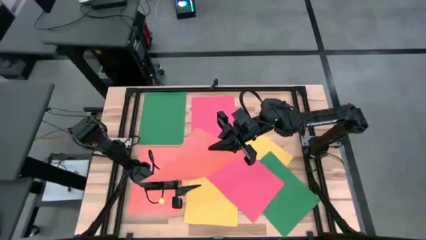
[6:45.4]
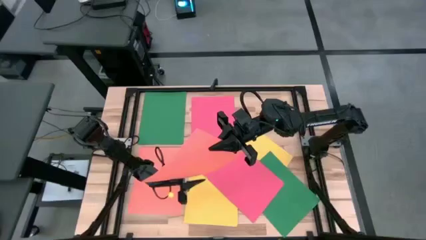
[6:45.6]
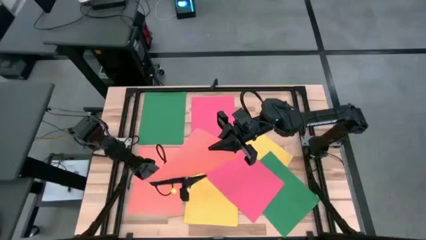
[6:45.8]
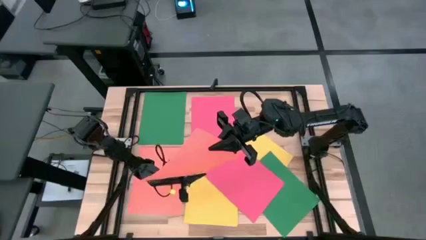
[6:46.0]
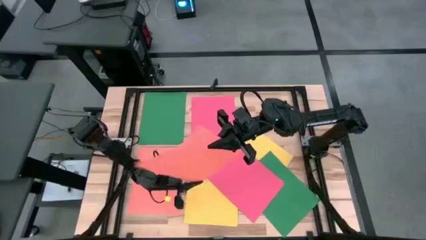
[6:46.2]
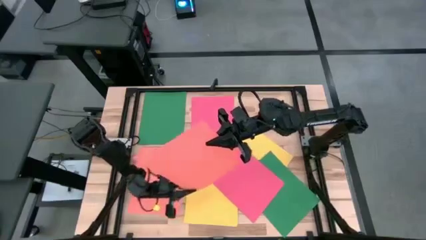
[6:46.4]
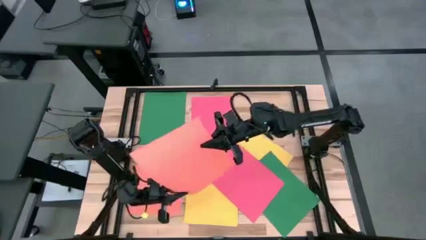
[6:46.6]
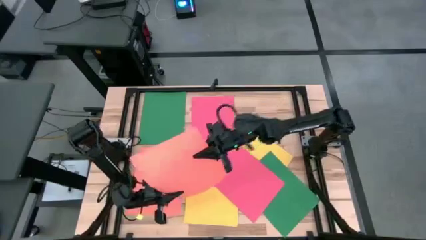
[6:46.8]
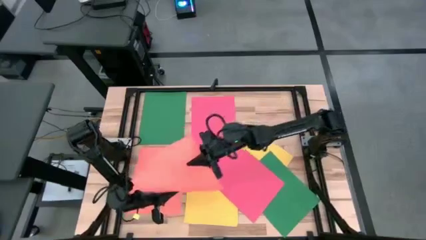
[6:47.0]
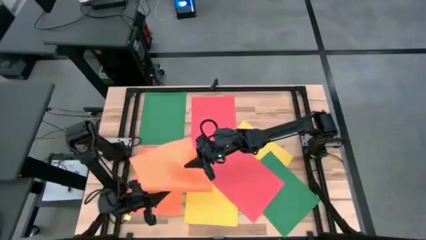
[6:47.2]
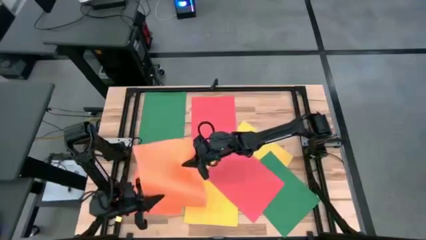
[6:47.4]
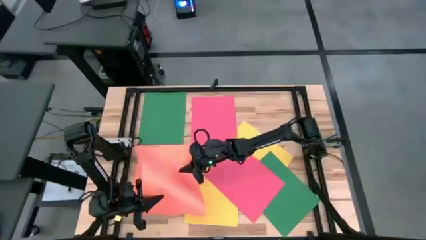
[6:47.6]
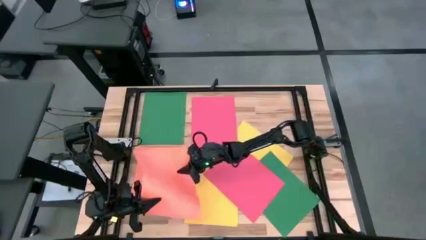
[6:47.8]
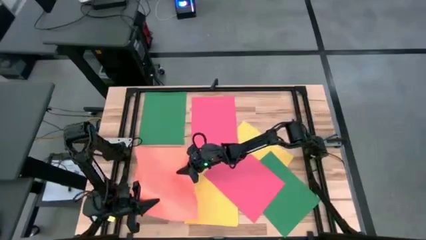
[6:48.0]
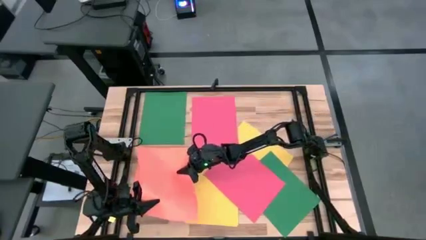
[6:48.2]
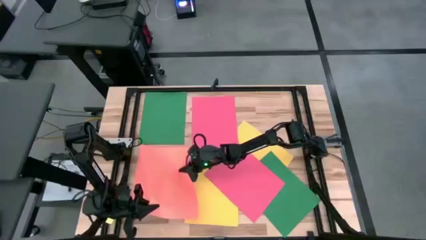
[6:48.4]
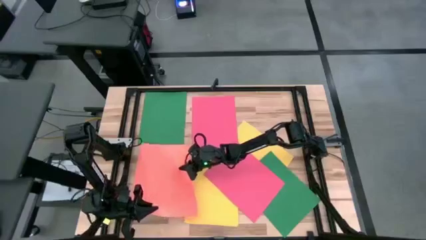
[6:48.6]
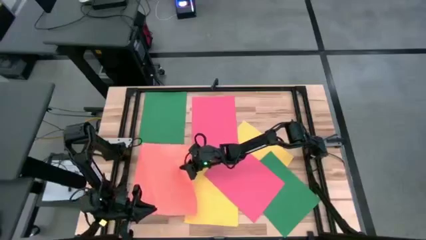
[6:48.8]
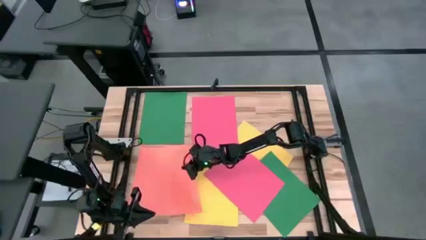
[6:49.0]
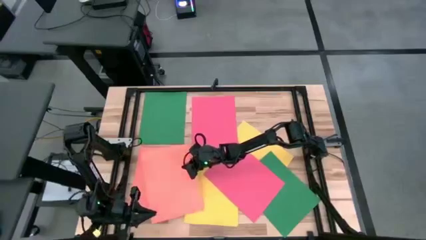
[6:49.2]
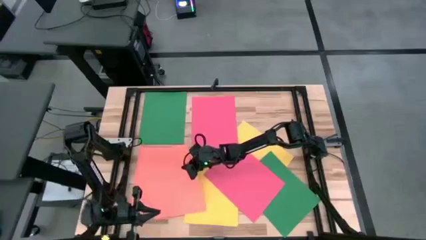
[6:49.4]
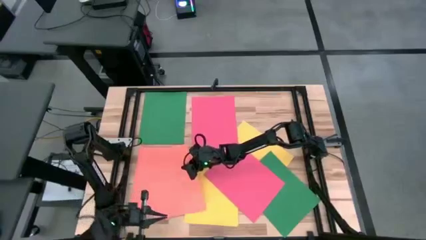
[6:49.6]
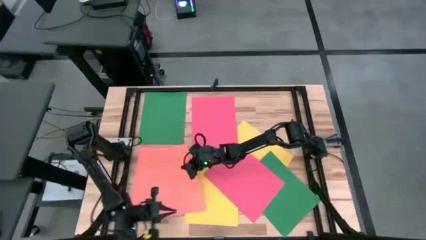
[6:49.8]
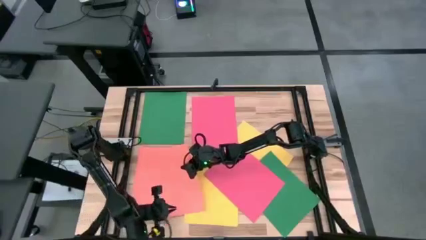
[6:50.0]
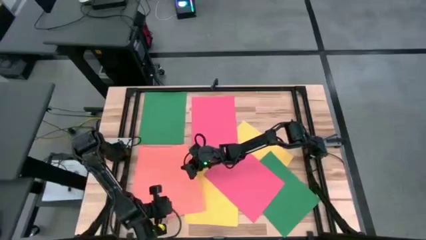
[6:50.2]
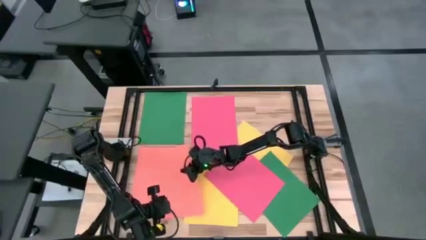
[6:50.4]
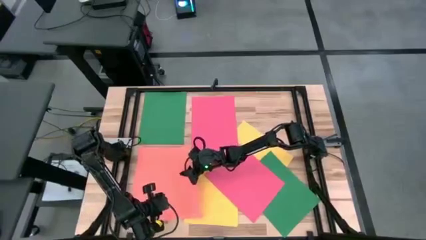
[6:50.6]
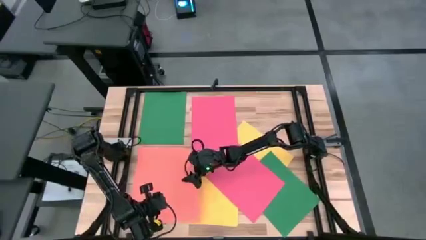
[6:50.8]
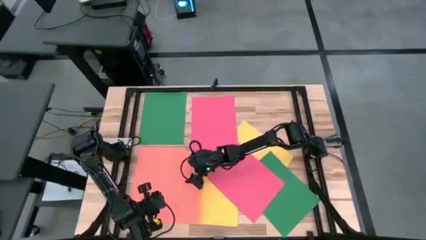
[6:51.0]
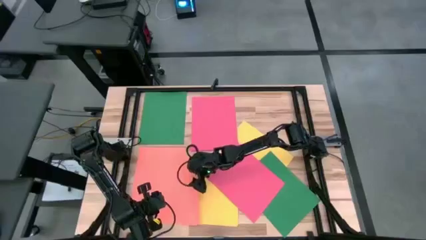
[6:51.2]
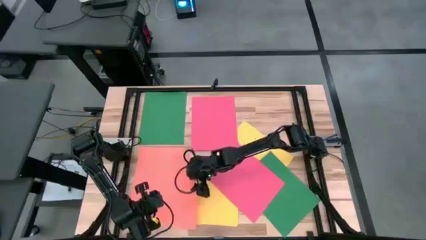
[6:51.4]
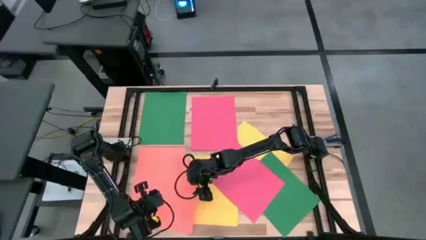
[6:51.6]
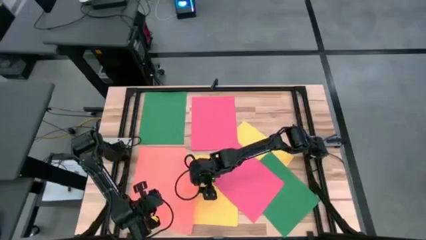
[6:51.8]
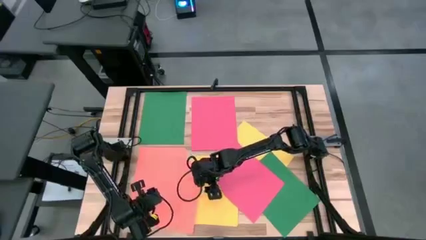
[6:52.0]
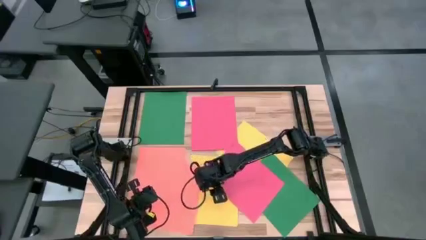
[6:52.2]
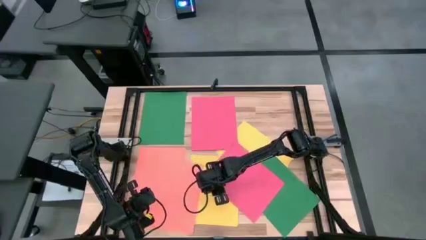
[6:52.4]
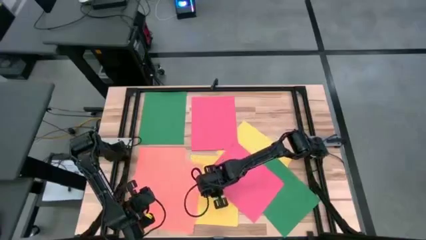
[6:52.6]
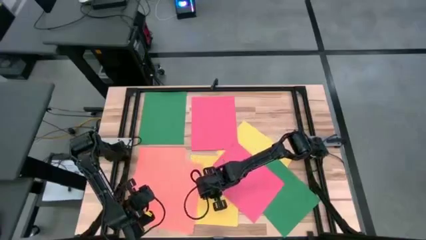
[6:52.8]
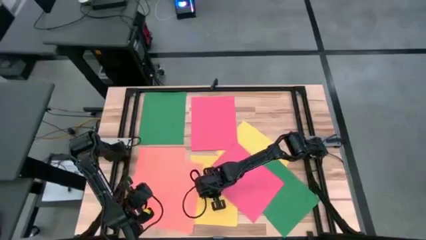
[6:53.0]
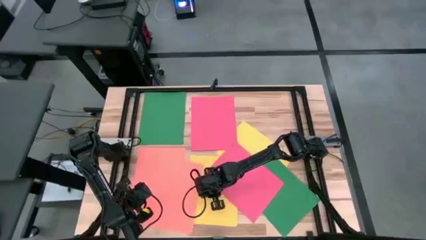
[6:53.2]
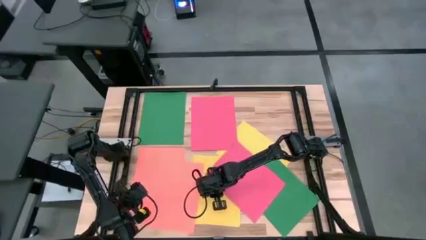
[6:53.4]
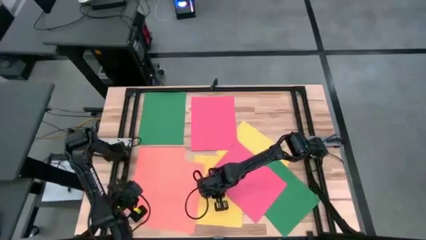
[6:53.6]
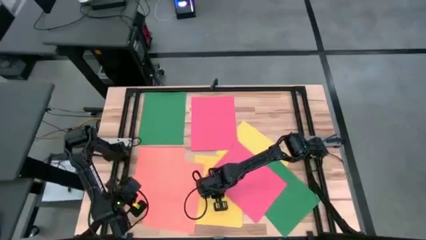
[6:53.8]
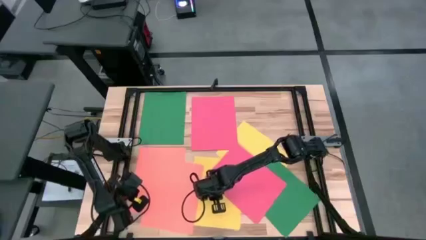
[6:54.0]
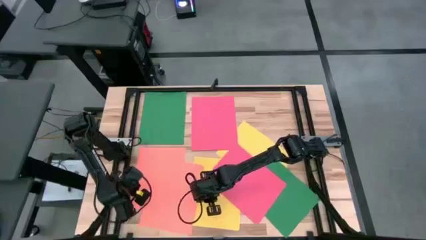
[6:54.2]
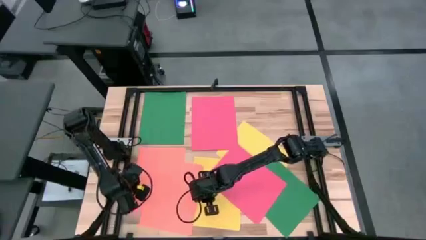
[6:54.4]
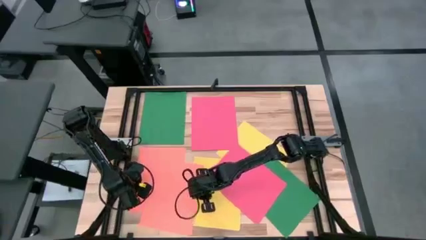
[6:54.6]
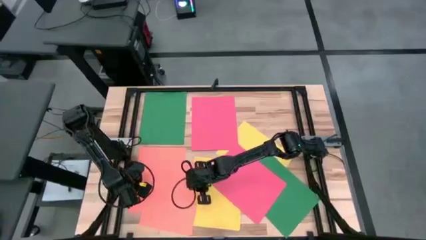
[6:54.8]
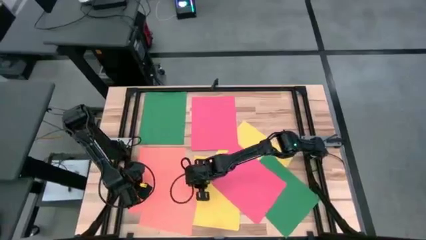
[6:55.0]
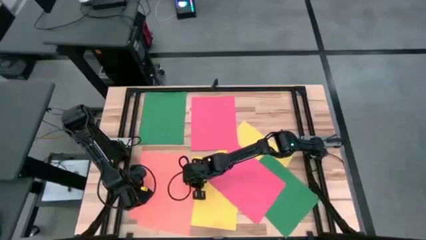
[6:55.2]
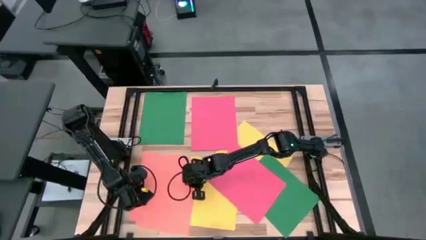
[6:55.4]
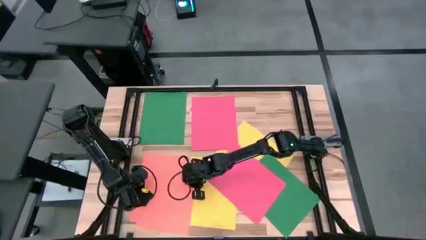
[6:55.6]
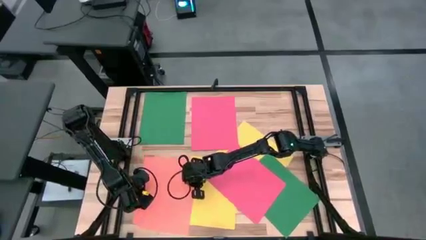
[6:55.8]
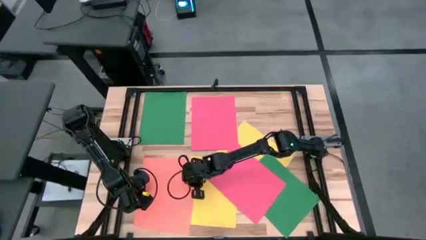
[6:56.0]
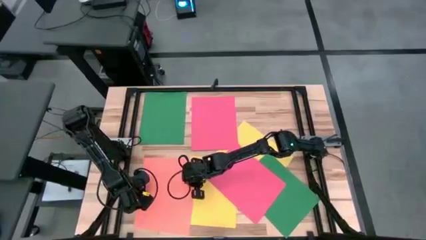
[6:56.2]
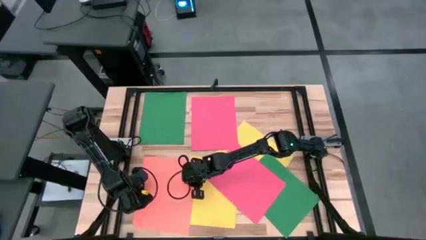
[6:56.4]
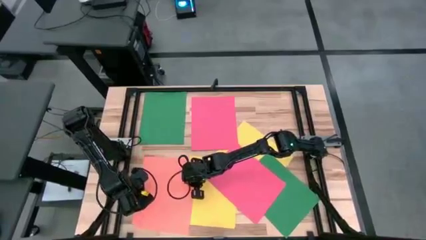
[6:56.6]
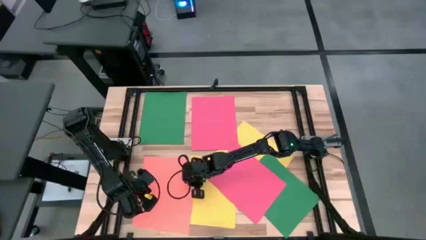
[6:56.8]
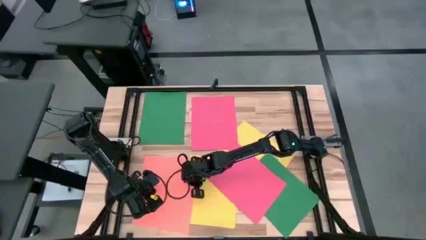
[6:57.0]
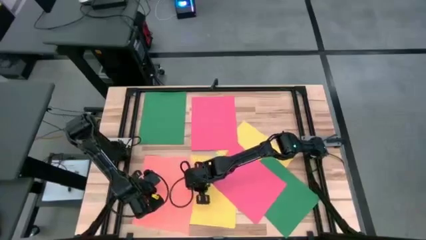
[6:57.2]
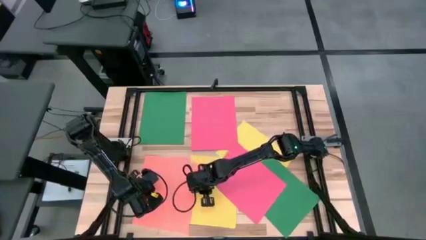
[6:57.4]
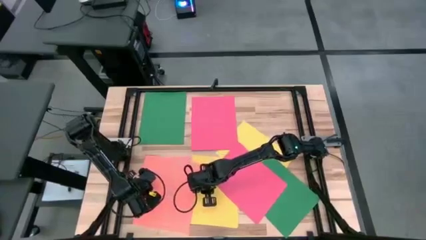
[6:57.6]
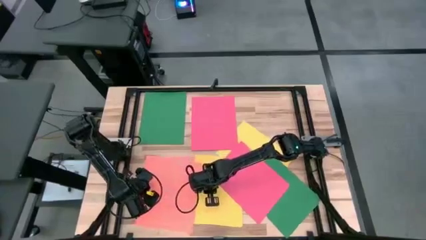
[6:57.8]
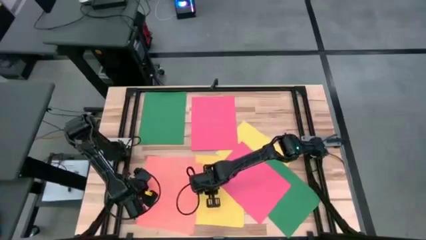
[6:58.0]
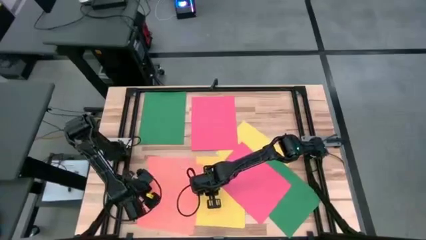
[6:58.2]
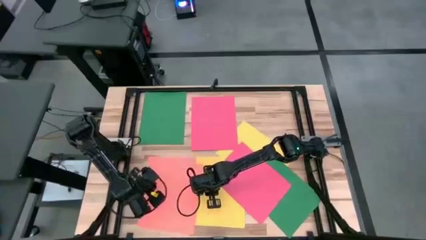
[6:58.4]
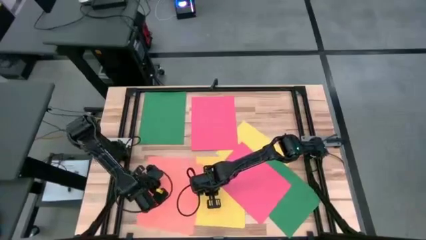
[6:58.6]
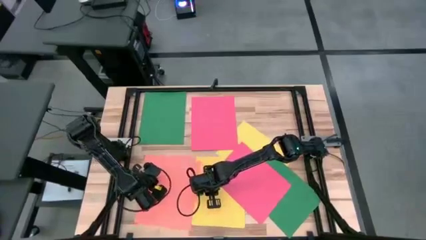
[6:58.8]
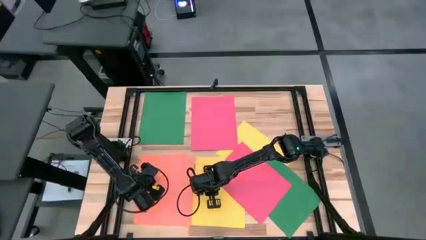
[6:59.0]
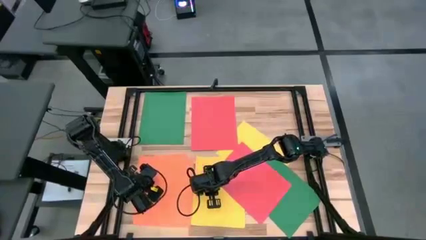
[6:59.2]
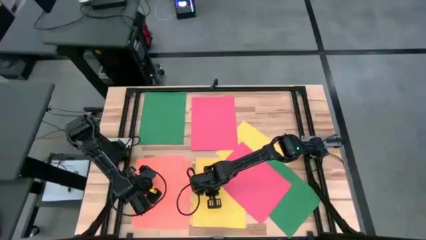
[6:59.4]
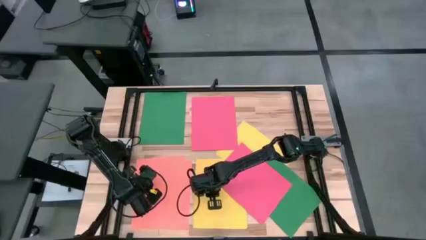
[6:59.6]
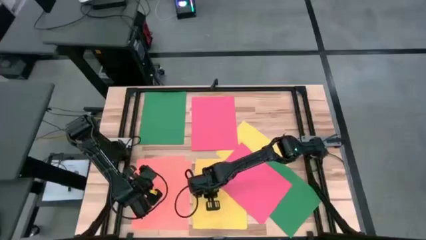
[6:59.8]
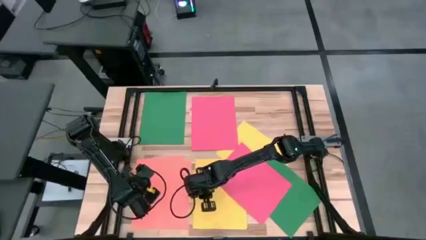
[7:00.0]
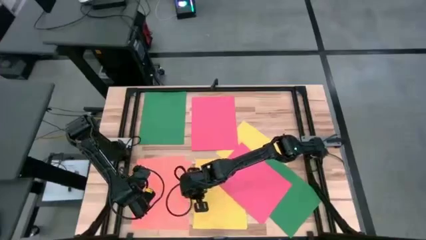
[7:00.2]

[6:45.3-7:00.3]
Task: Organize paper
Stack the orange paper on top of the orange paper
